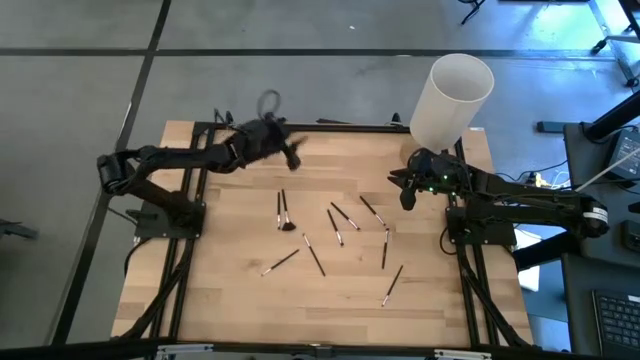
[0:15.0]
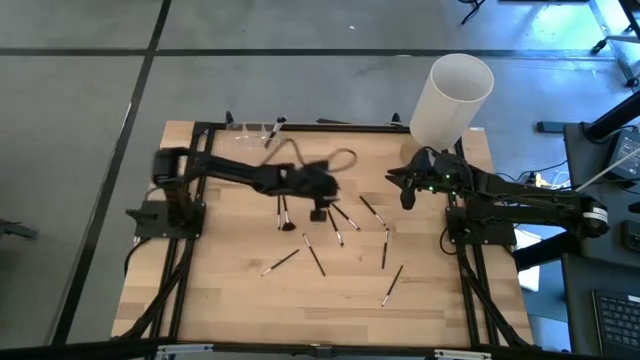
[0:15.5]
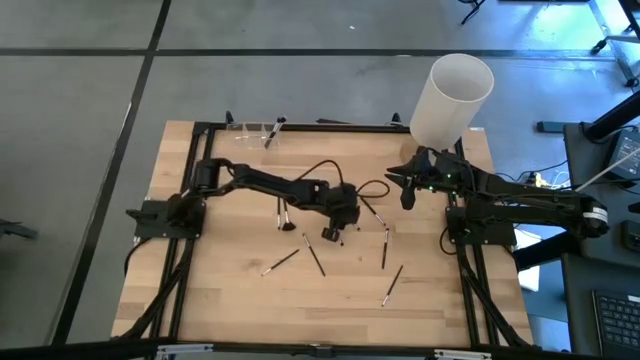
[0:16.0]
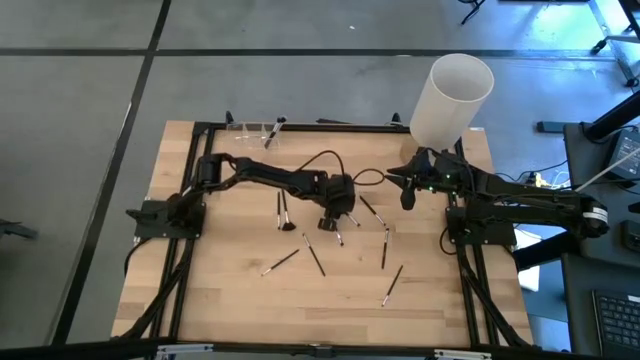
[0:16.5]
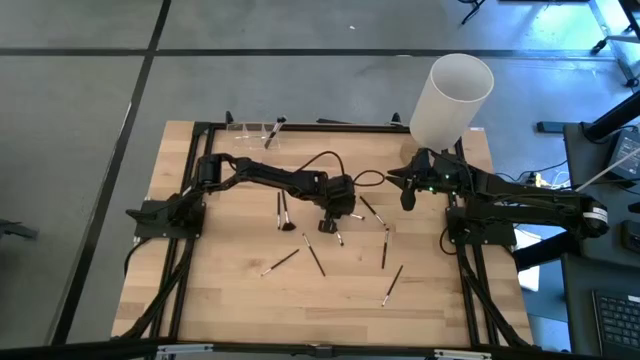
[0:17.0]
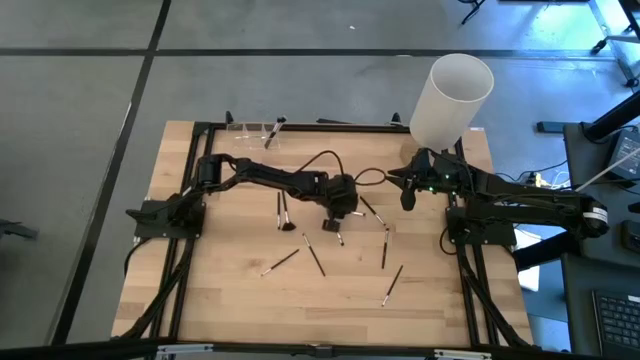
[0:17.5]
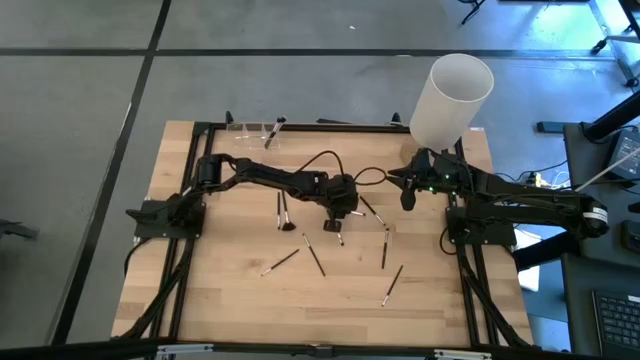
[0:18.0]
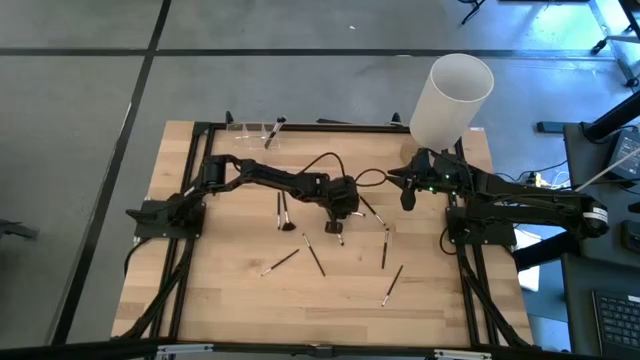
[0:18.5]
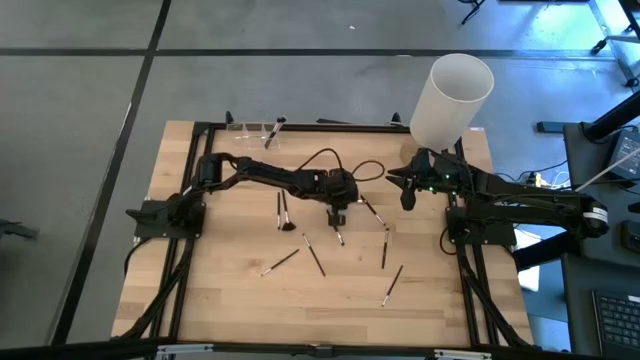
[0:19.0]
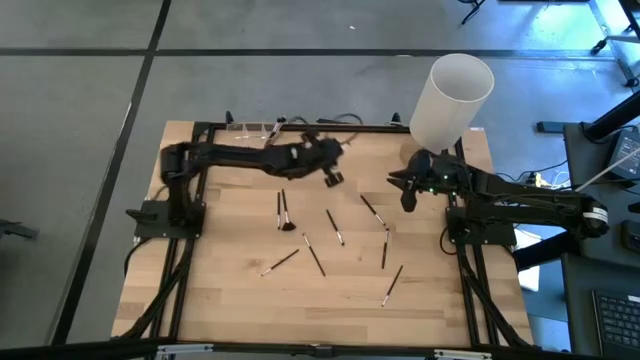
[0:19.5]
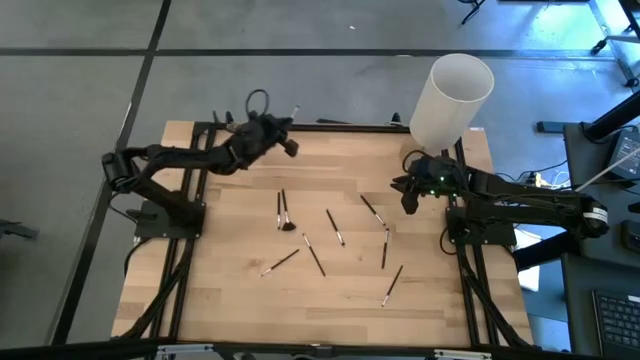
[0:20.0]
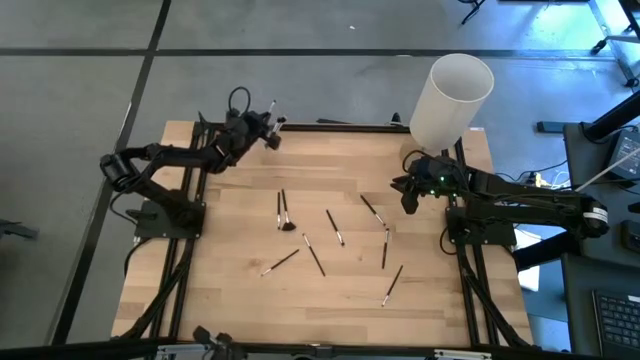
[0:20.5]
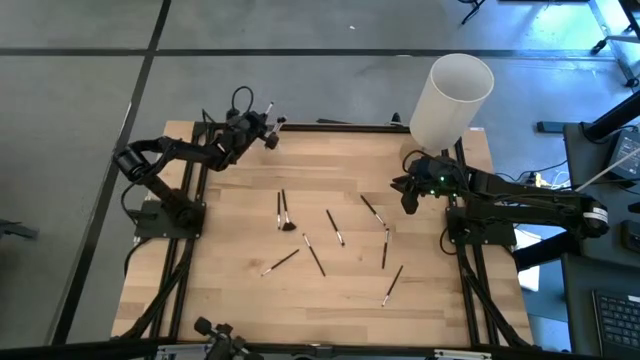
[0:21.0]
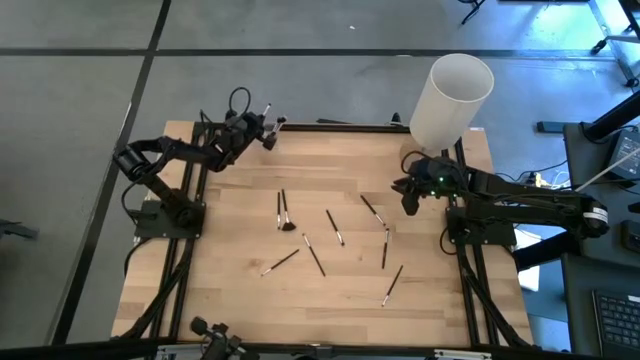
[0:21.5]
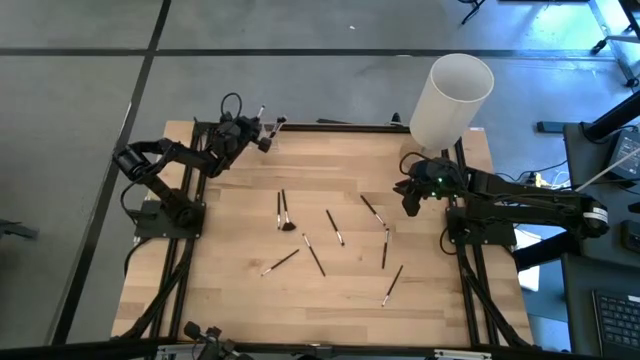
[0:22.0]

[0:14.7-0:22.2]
Task: Put items in baskets/containers
Put the black eyeshadow brush into the transparent organizer

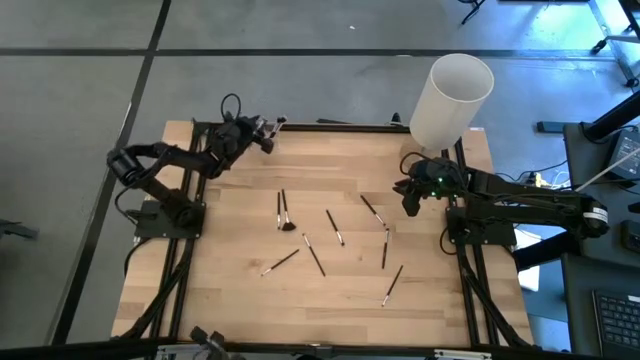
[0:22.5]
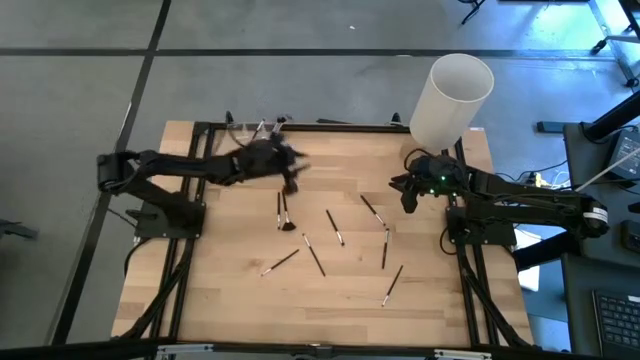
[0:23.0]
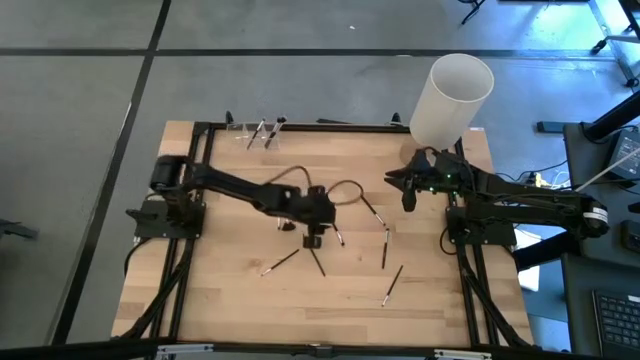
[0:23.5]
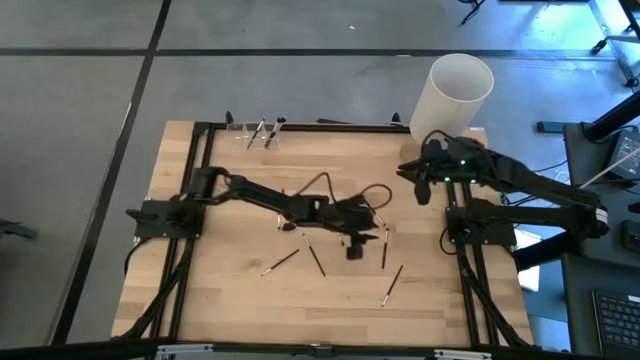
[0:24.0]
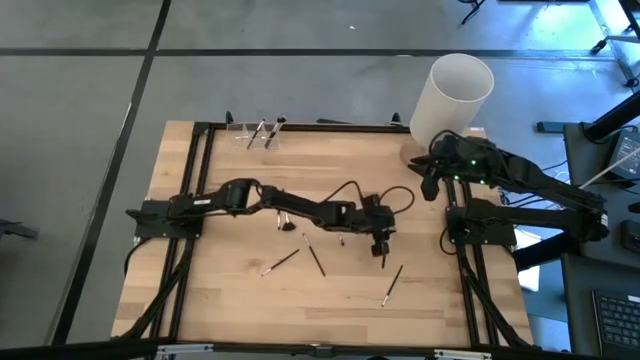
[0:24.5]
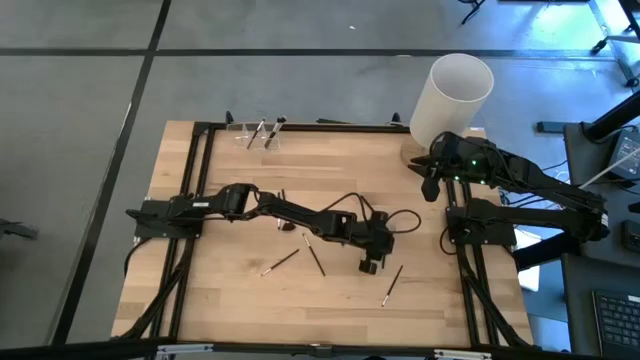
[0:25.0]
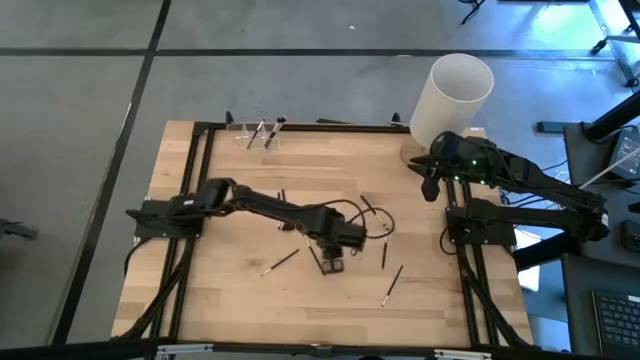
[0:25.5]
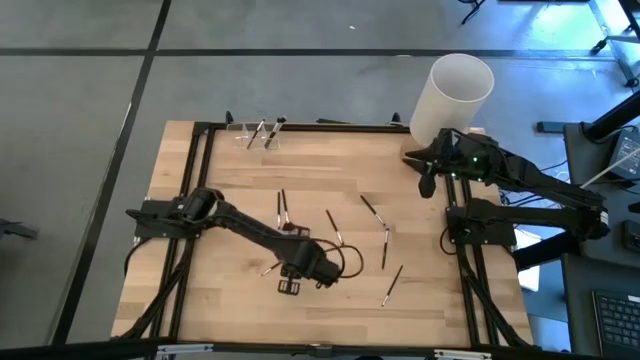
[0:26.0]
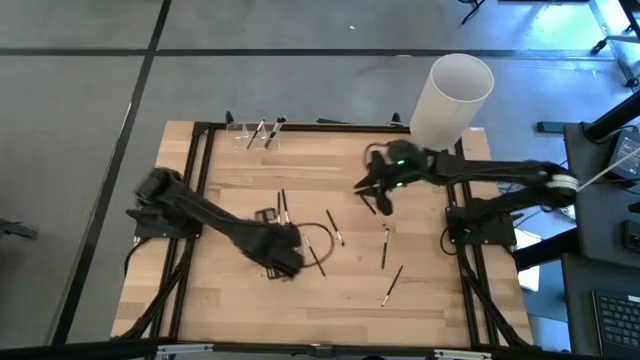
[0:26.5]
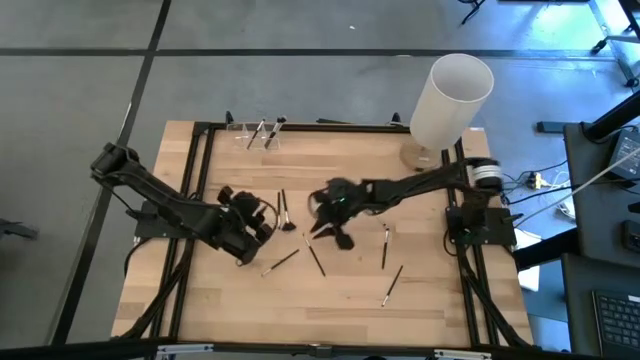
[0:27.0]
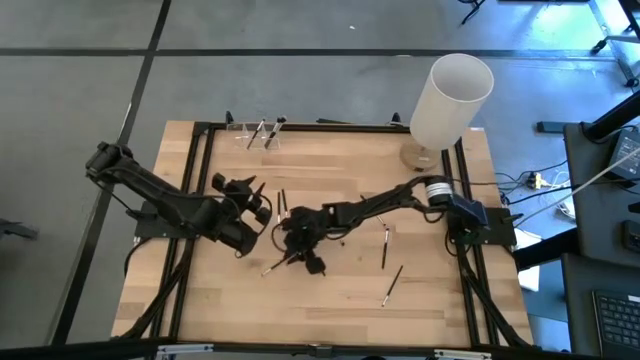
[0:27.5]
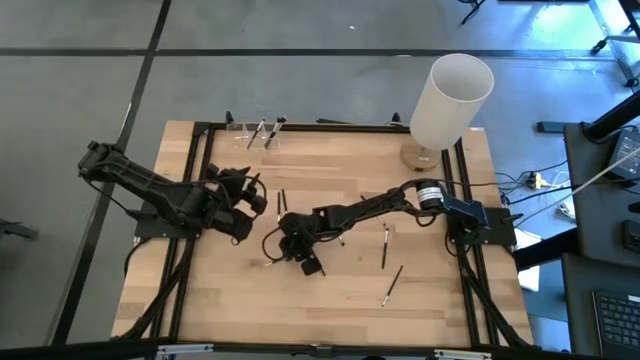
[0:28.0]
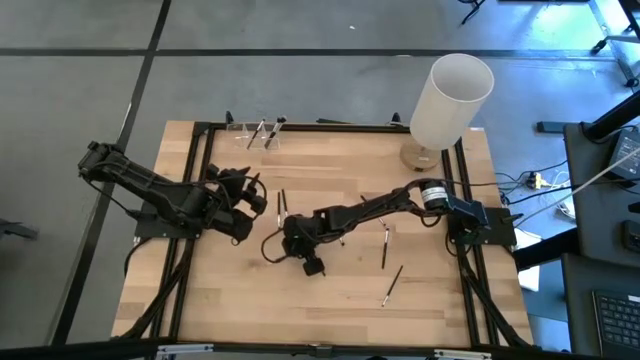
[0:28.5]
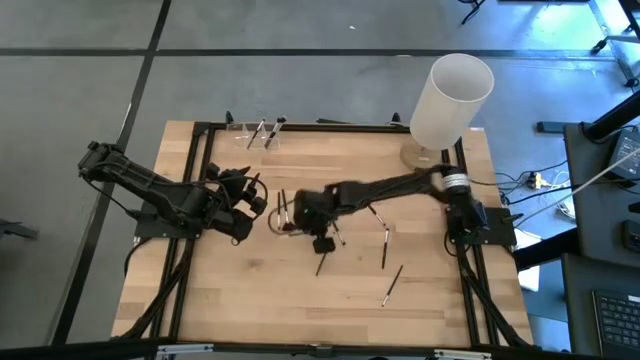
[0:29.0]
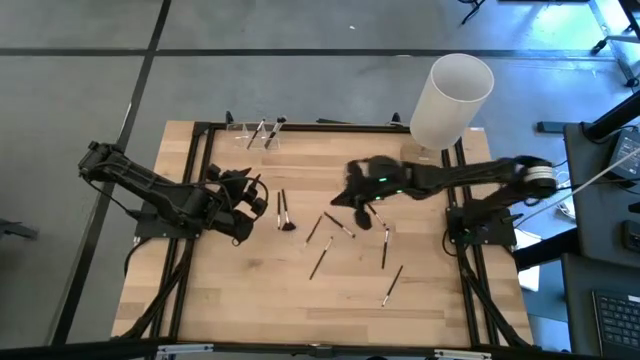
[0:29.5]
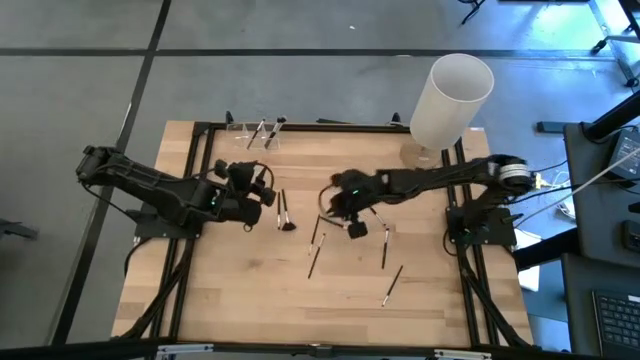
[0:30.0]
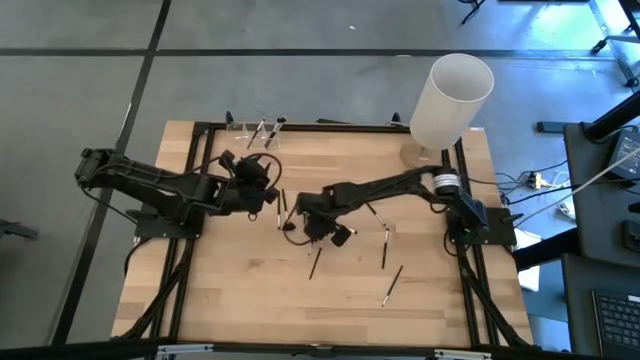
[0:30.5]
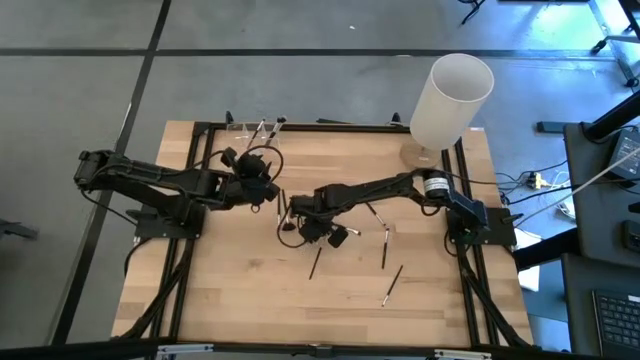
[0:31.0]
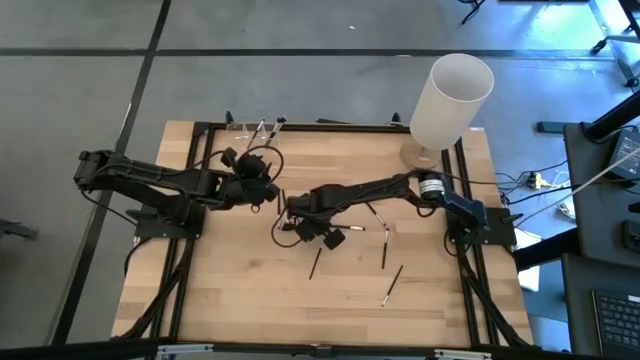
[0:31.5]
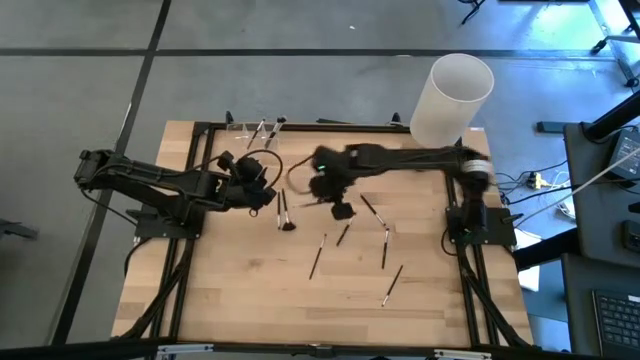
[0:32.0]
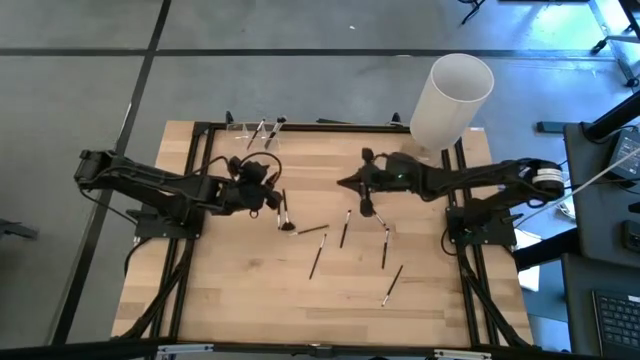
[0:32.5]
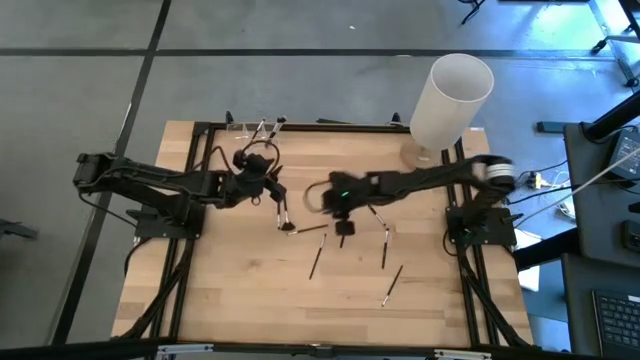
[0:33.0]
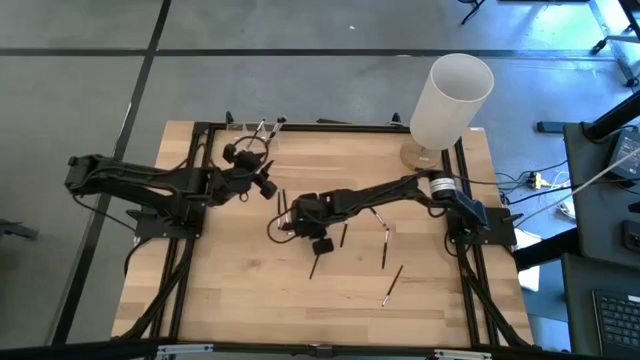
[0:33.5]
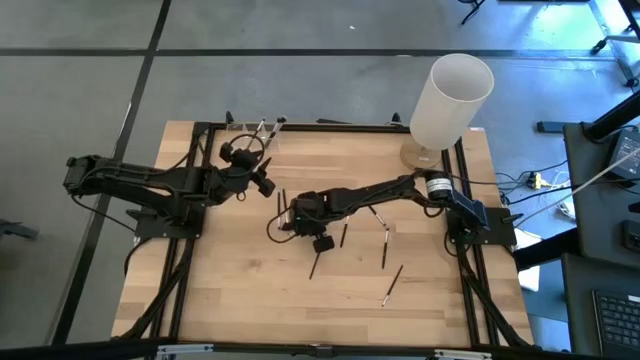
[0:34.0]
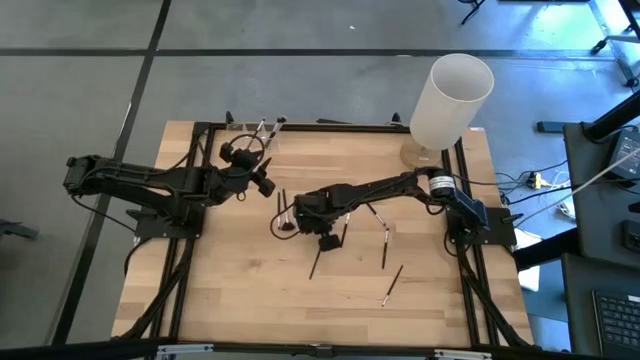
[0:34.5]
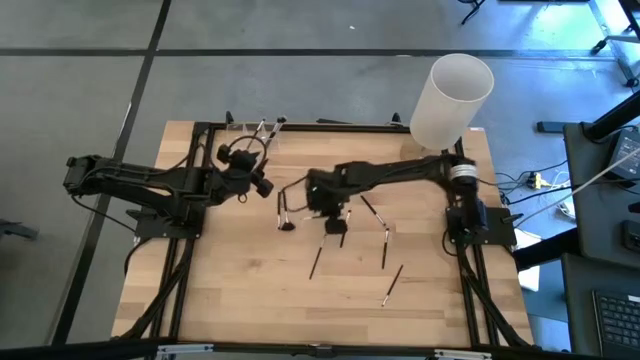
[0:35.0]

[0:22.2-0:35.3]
Put the black eyeshadow brush into the transparent organizer
